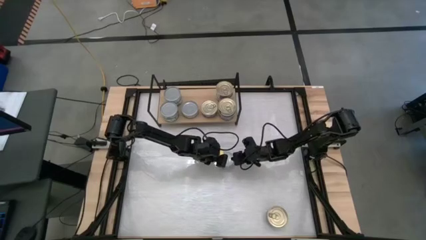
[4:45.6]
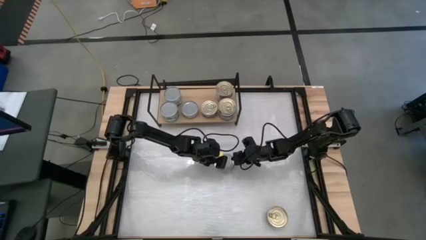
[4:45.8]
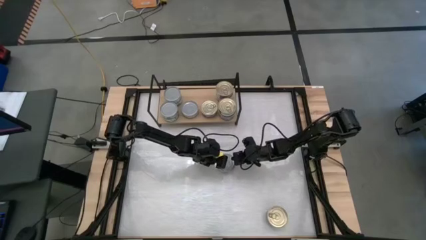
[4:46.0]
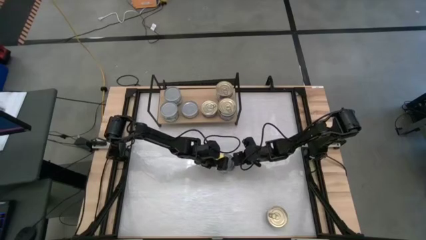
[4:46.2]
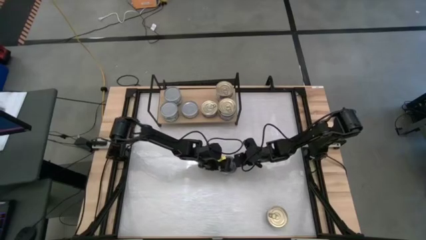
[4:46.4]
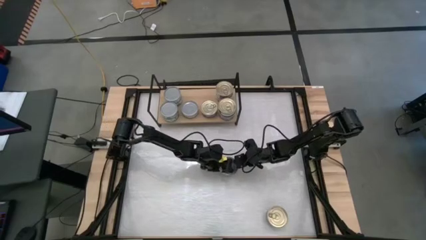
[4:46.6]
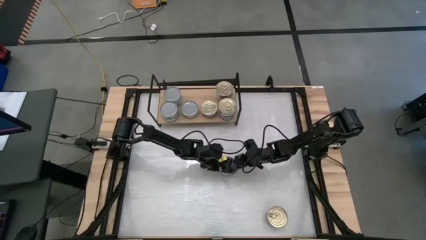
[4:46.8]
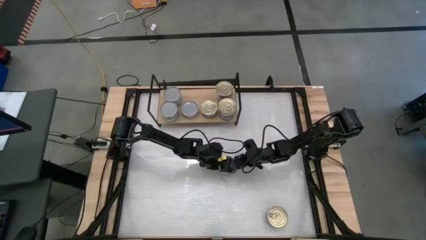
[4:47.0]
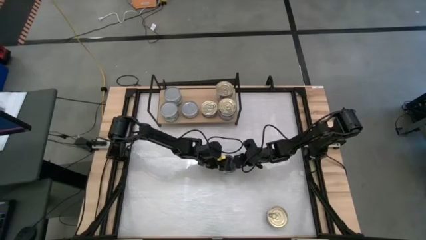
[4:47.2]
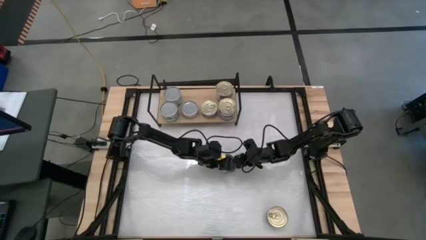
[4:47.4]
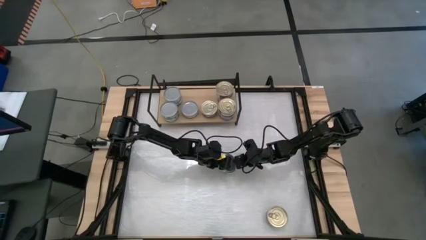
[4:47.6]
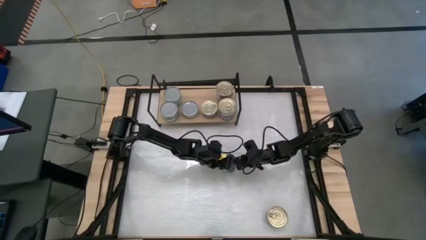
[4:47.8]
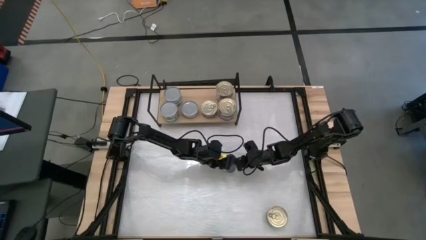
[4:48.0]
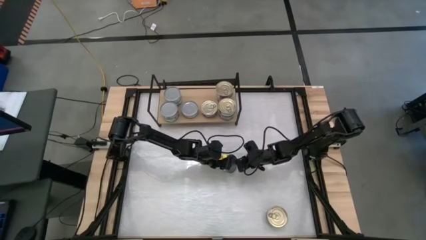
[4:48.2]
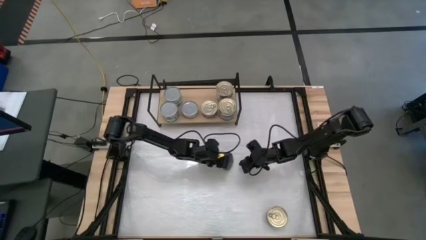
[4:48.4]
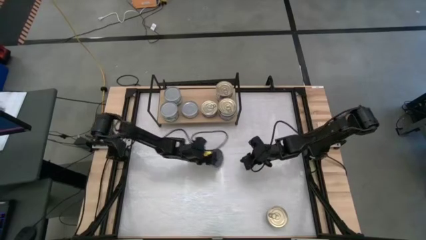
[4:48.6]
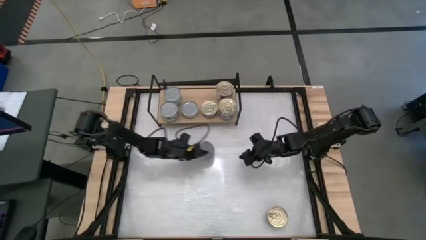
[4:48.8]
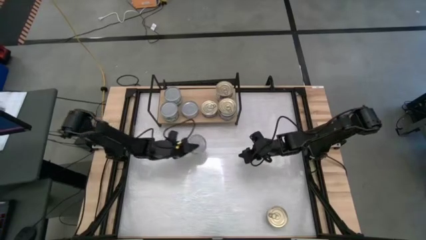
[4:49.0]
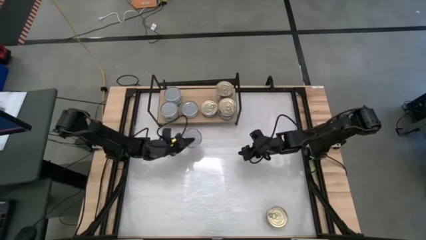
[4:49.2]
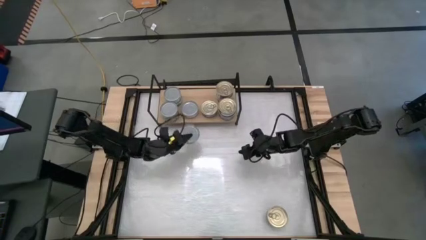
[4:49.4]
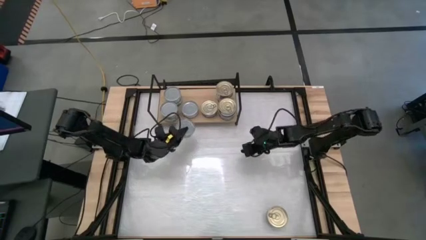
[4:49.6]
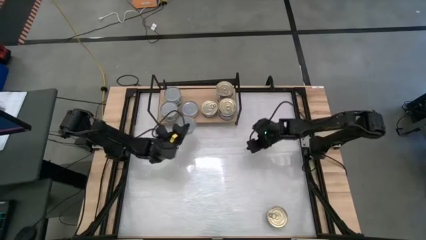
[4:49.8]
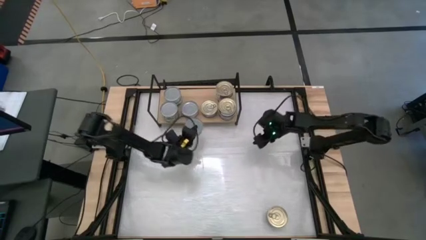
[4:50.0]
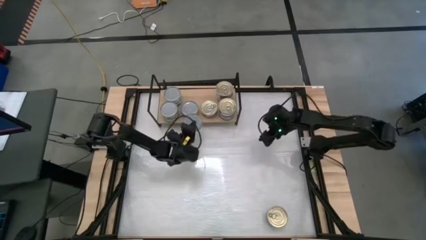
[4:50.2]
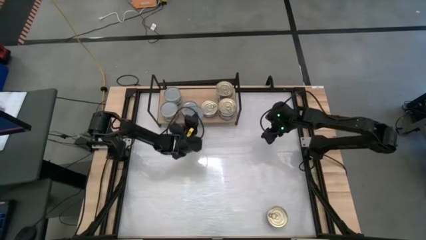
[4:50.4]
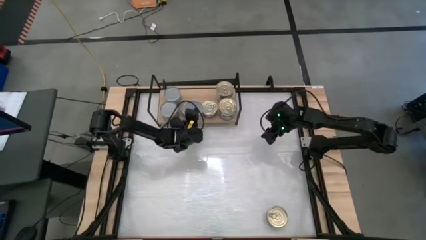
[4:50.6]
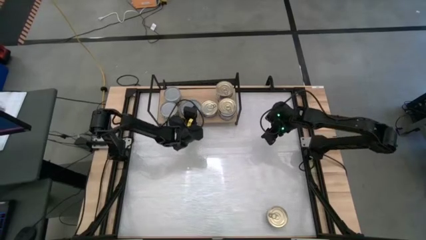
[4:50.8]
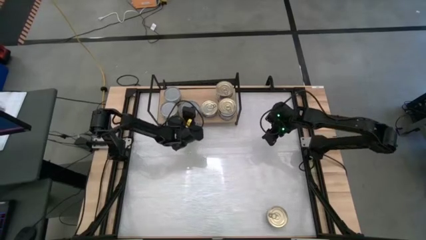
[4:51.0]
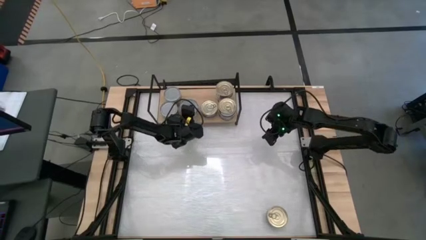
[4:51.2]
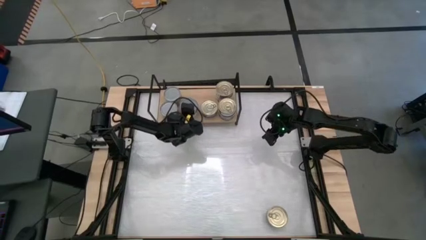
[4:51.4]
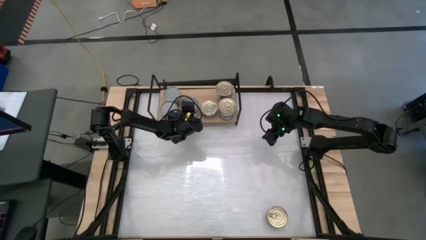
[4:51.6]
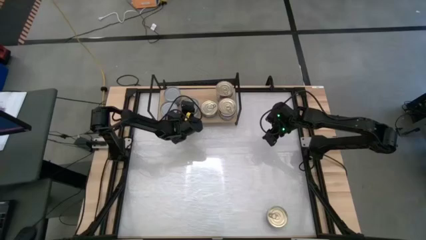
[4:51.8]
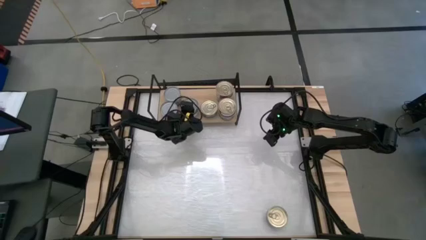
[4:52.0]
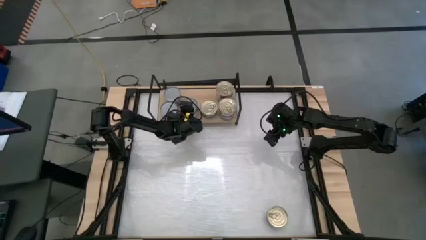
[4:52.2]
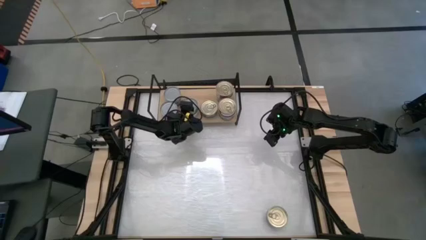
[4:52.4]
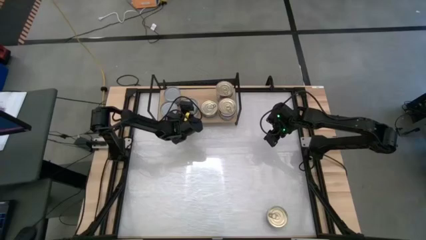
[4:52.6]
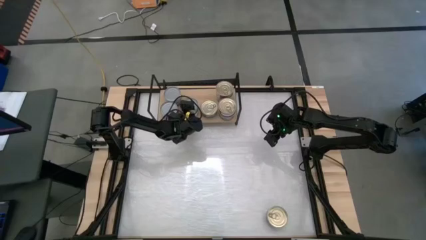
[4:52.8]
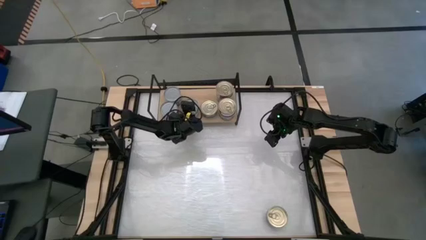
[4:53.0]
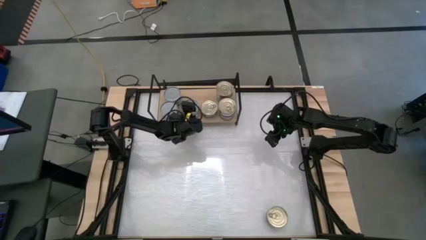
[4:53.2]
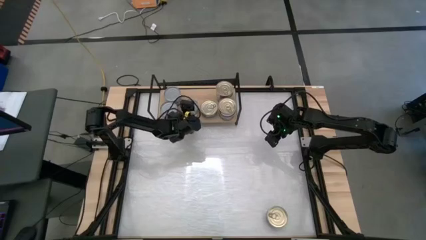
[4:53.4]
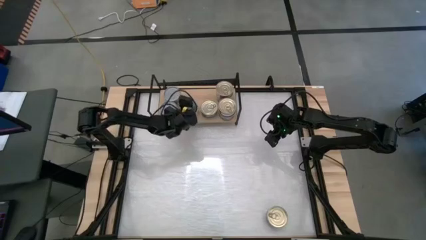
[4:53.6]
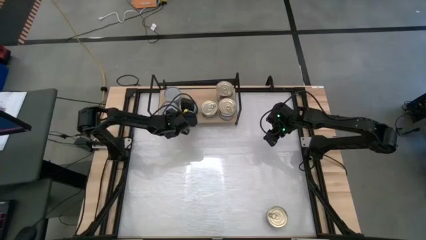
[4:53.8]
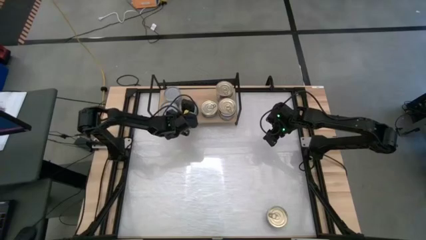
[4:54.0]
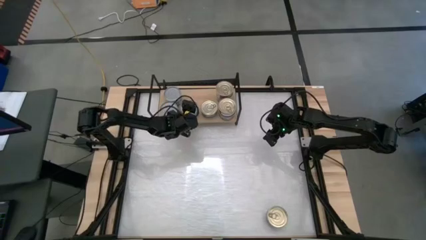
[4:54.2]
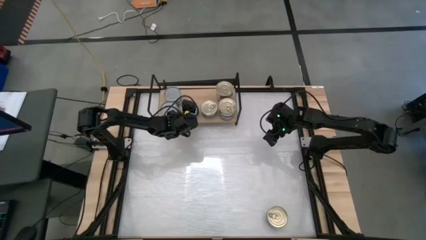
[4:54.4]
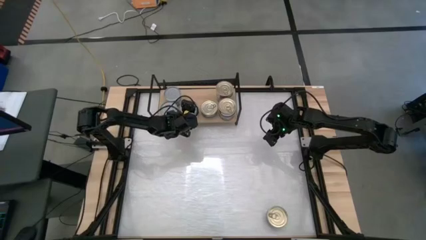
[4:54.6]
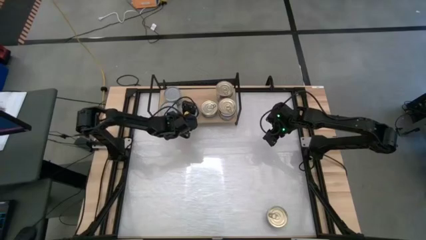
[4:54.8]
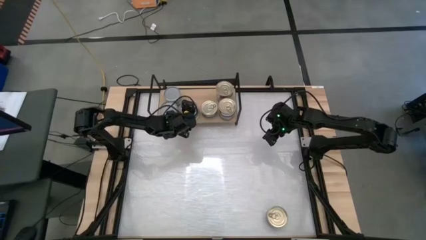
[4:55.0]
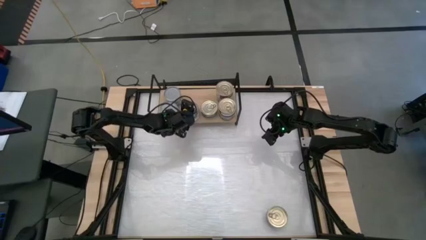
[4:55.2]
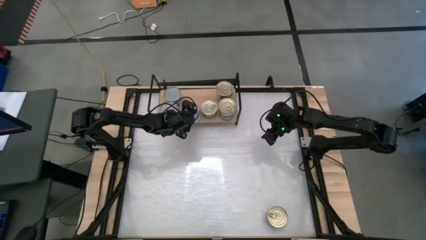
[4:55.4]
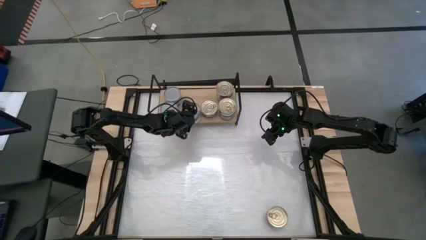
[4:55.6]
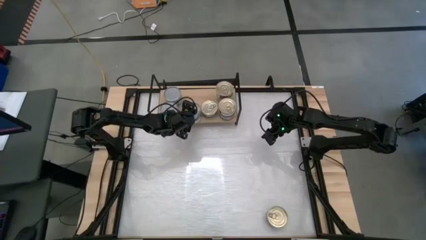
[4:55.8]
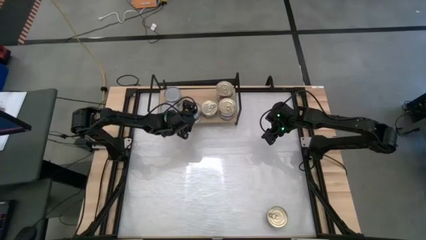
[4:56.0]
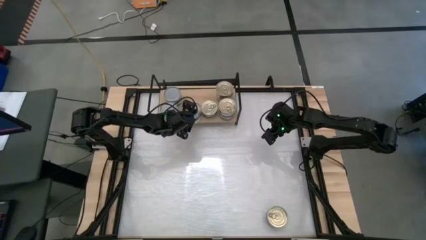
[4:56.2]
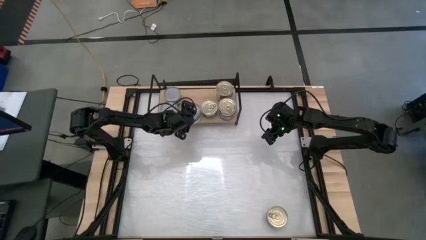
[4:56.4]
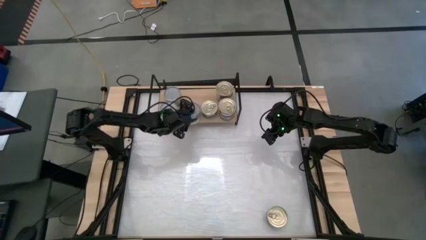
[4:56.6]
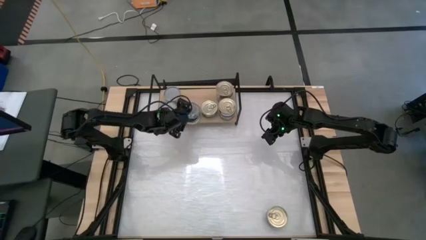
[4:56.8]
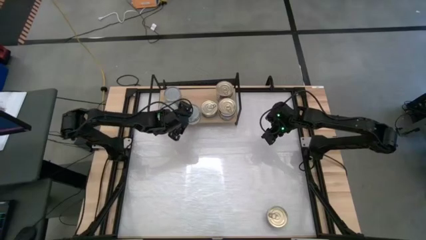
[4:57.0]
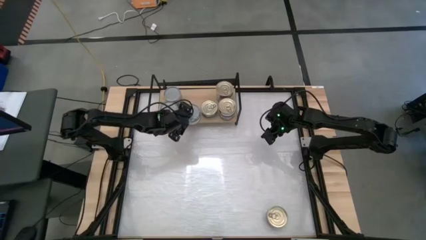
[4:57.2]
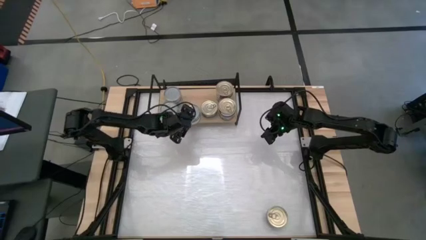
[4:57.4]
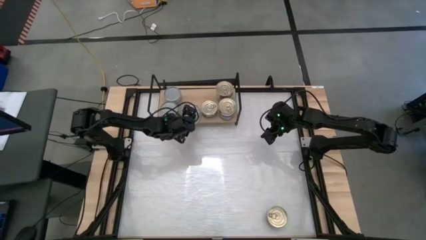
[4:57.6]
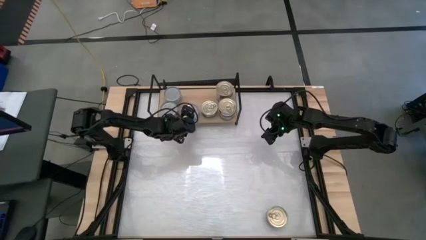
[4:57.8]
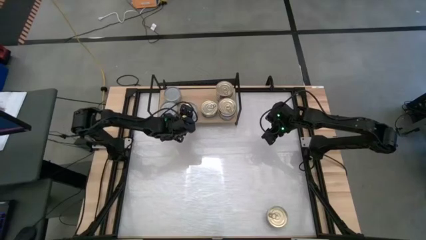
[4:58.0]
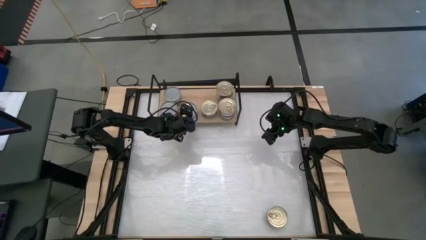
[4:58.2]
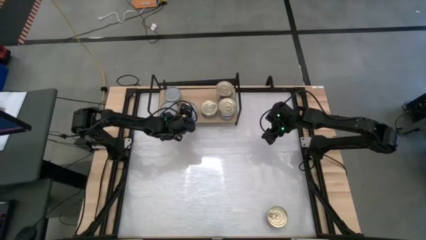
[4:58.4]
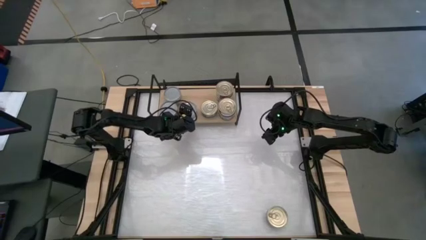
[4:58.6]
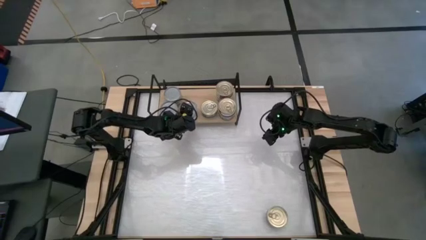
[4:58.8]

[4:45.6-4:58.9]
Task: Stack canned seafood by type on shelf
Stack the green tuna can on top of the green tuna can on the shelf

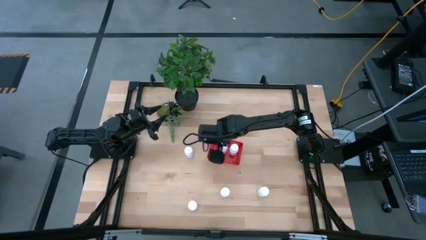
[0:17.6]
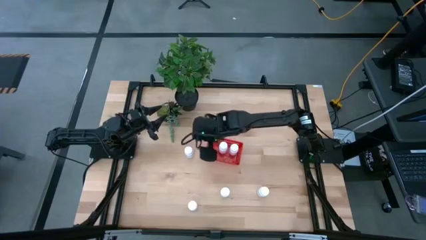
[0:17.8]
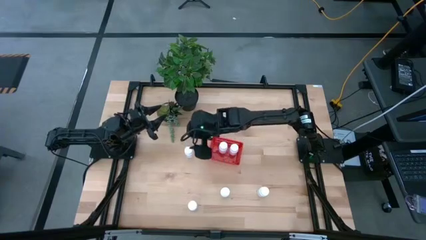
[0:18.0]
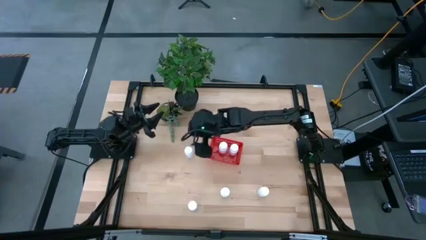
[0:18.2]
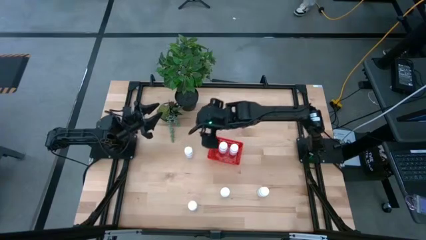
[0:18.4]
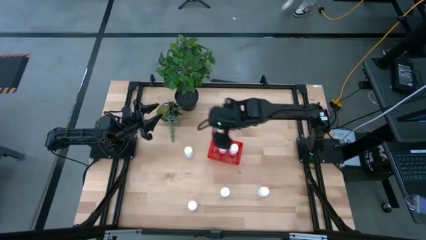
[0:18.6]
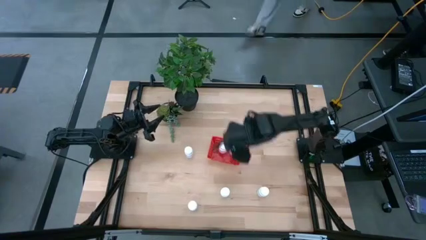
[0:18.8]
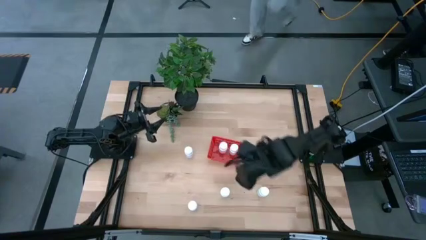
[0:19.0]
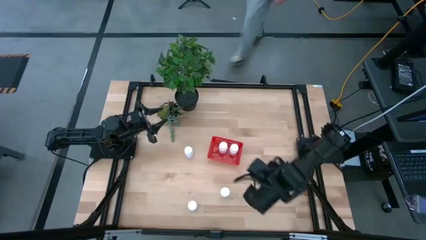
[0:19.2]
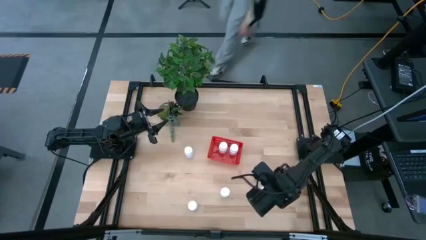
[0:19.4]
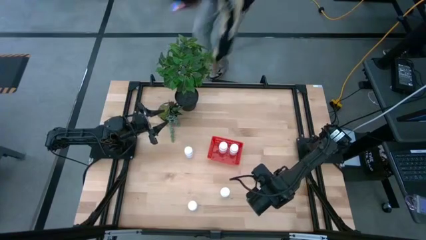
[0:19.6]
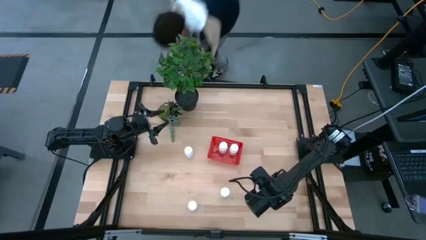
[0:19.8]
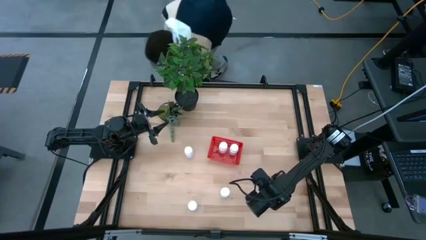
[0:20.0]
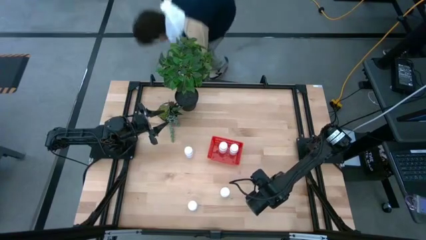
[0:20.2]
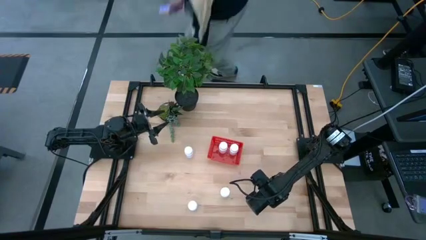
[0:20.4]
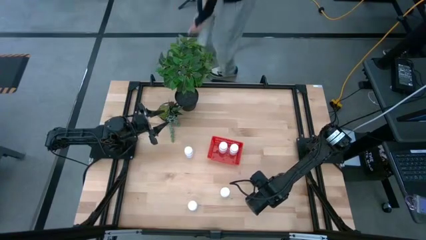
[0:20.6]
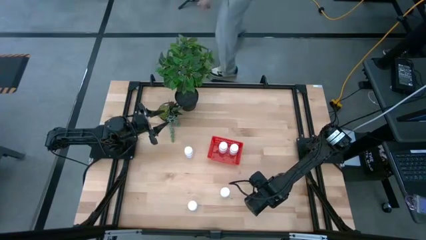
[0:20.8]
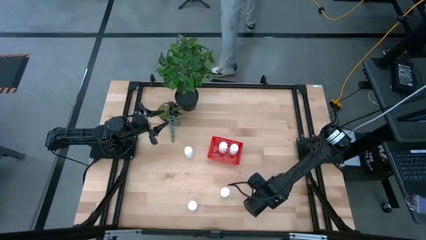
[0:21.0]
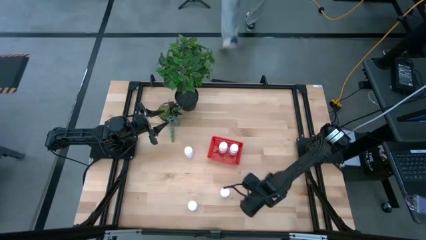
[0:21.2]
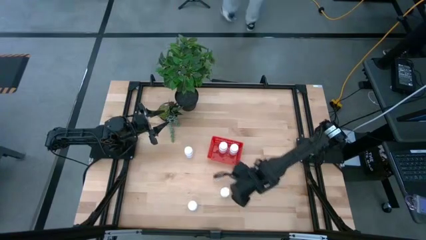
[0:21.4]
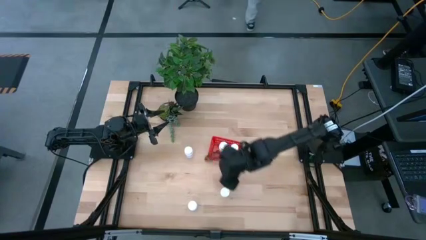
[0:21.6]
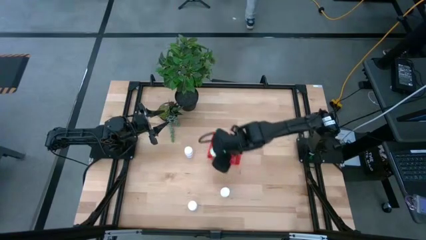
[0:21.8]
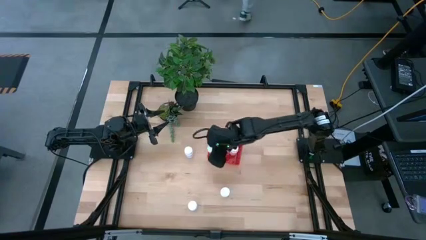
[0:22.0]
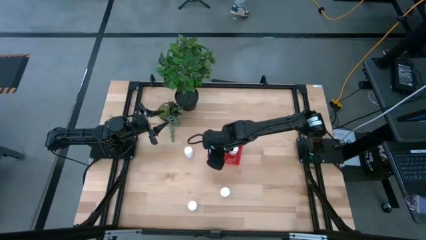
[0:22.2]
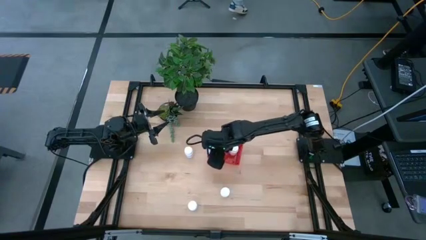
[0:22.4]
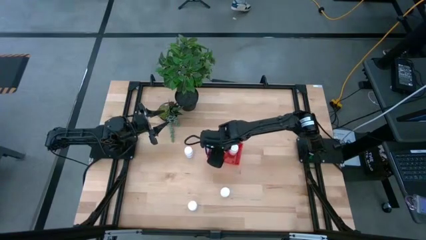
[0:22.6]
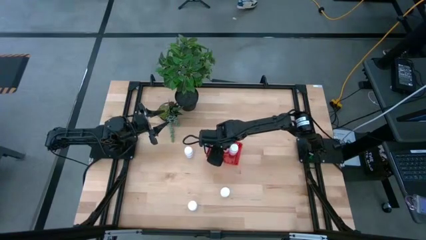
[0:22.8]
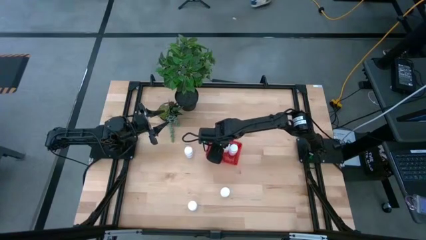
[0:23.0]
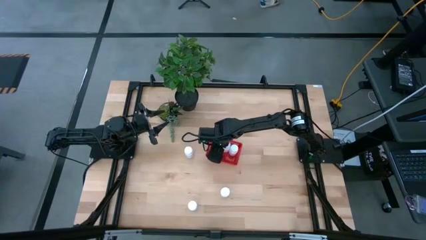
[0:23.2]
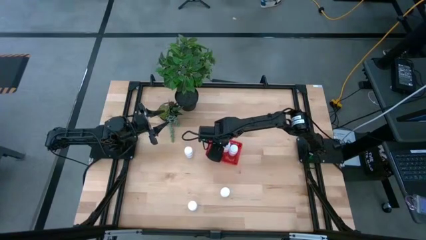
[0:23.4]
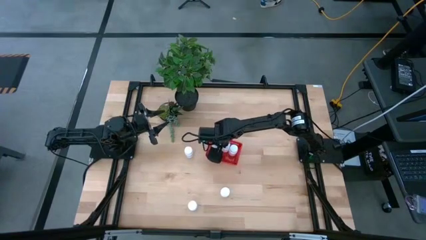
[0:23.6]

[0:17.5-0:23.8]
Task: Pick and place pill bottles into a basket
Put the white pill bottle into the red bin
